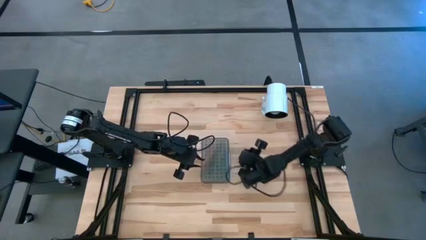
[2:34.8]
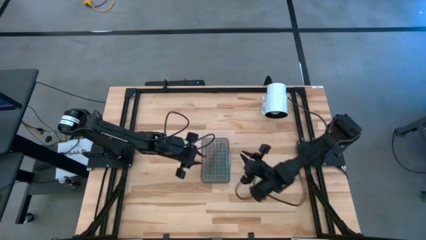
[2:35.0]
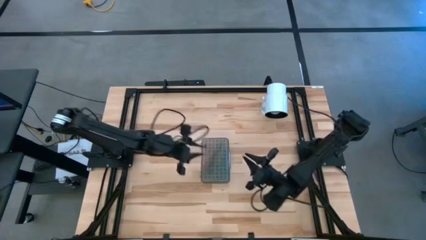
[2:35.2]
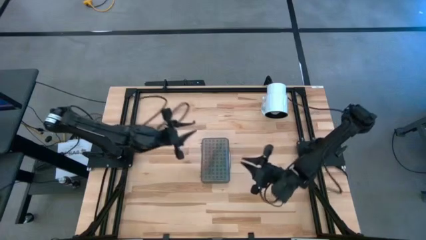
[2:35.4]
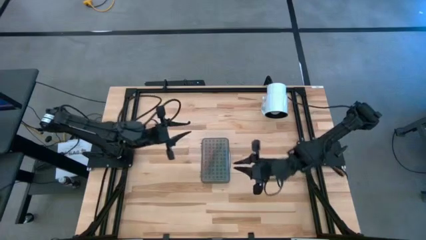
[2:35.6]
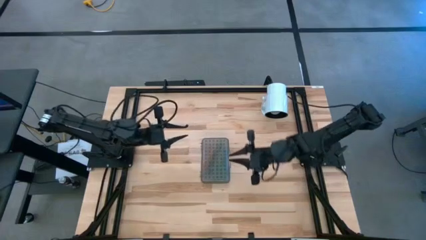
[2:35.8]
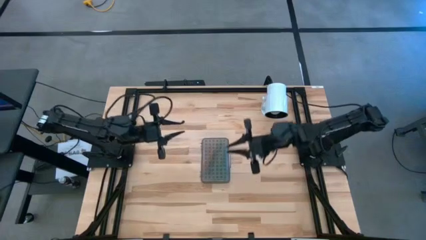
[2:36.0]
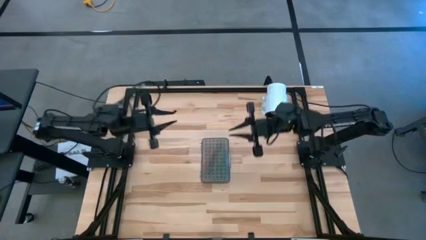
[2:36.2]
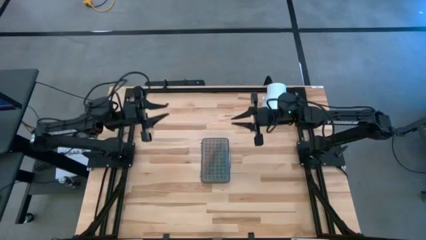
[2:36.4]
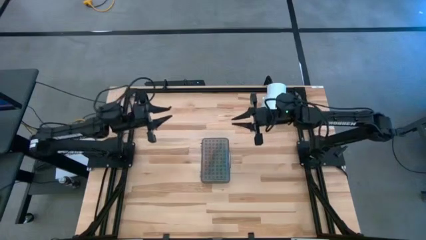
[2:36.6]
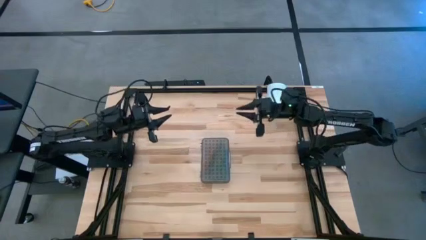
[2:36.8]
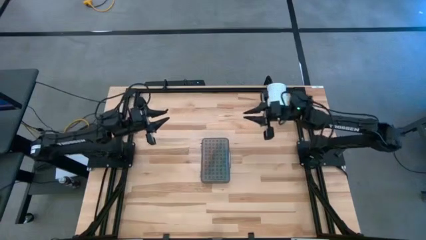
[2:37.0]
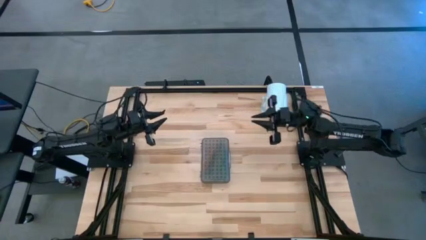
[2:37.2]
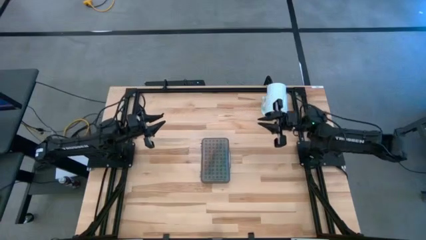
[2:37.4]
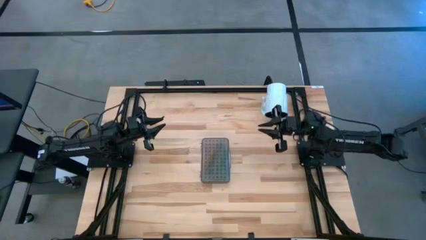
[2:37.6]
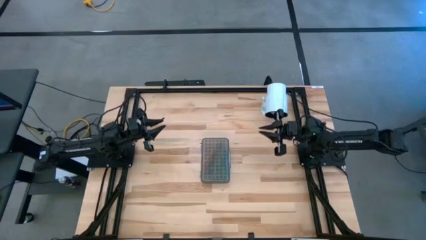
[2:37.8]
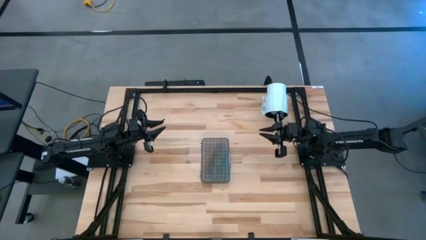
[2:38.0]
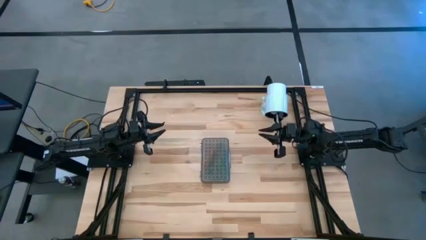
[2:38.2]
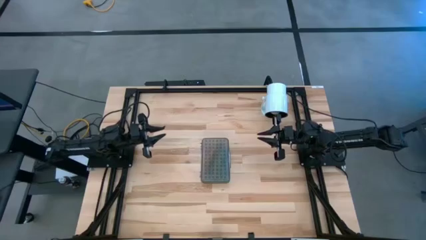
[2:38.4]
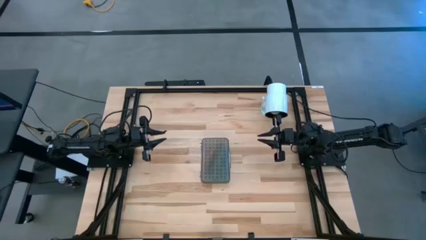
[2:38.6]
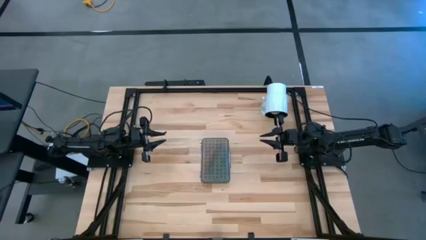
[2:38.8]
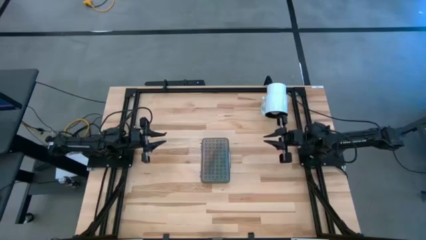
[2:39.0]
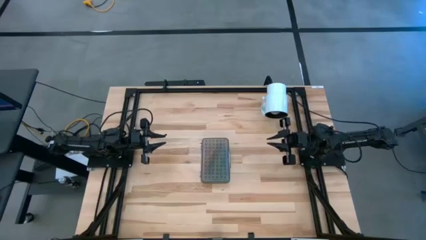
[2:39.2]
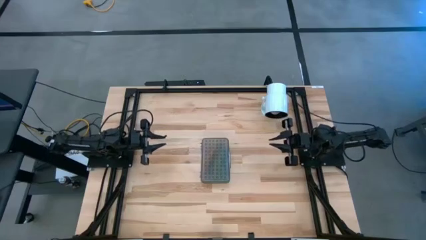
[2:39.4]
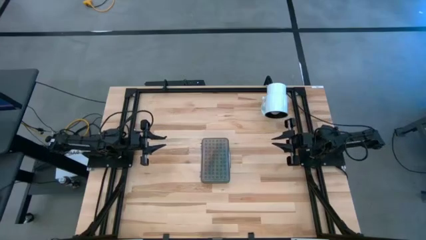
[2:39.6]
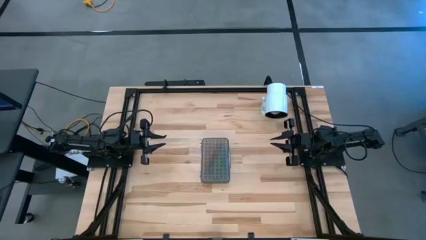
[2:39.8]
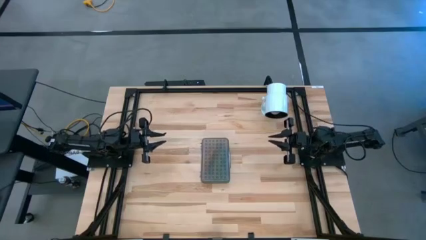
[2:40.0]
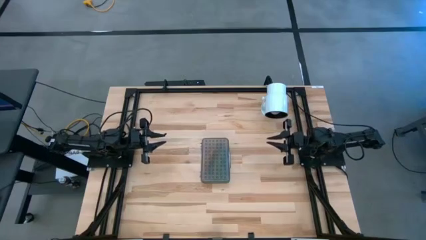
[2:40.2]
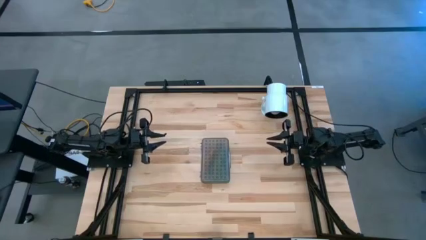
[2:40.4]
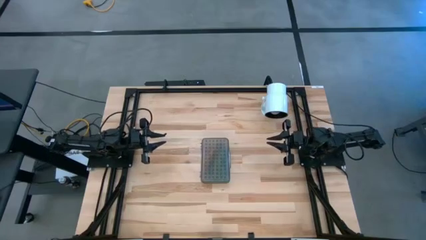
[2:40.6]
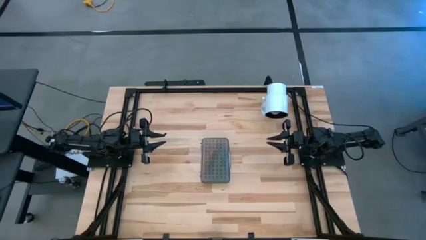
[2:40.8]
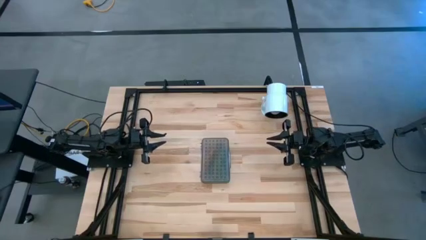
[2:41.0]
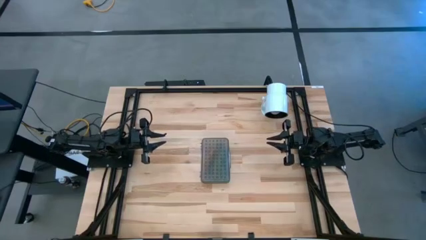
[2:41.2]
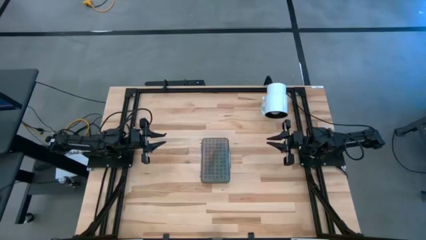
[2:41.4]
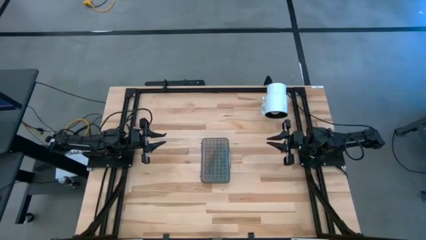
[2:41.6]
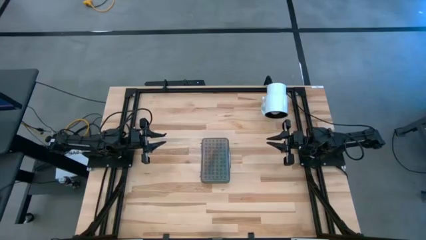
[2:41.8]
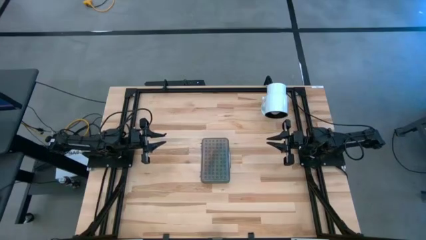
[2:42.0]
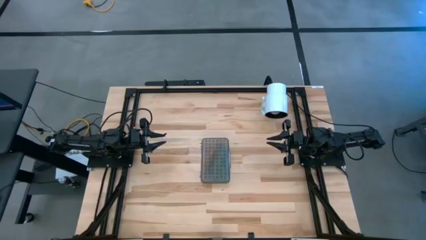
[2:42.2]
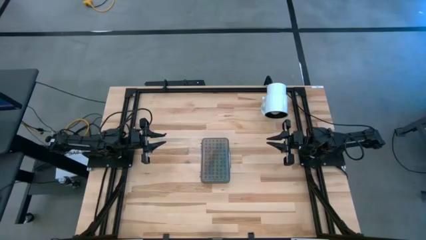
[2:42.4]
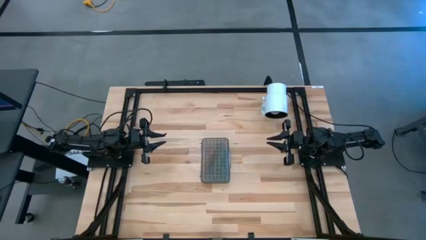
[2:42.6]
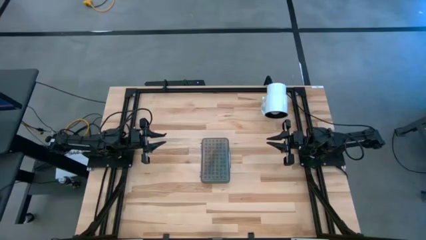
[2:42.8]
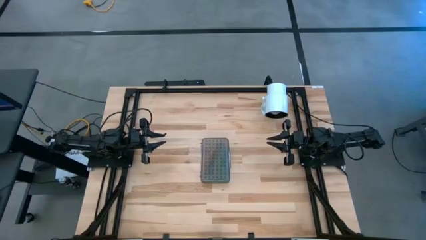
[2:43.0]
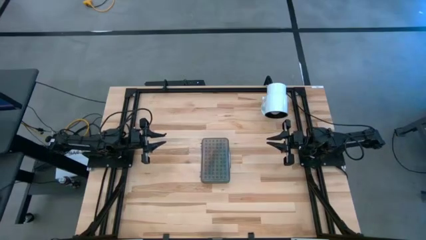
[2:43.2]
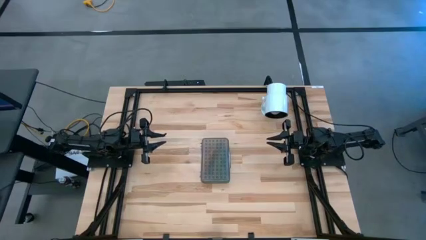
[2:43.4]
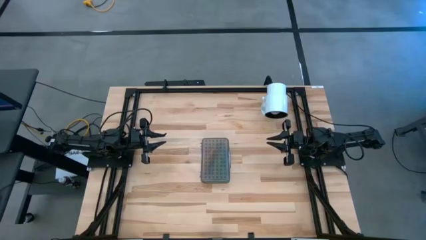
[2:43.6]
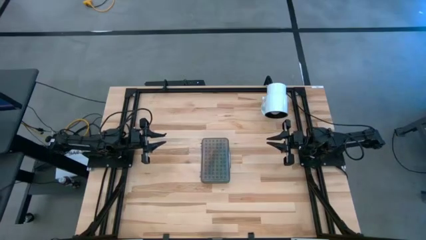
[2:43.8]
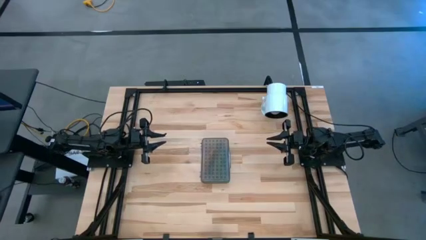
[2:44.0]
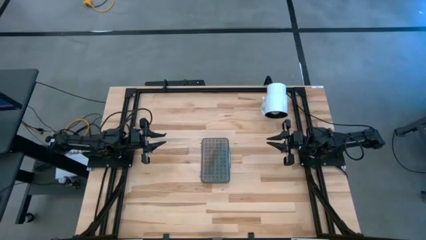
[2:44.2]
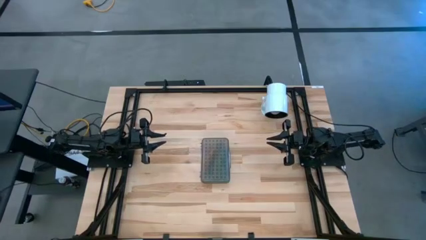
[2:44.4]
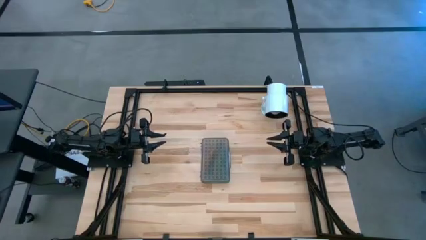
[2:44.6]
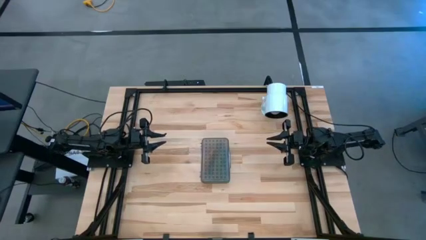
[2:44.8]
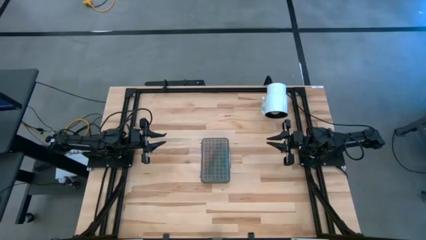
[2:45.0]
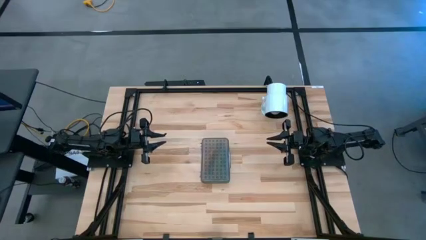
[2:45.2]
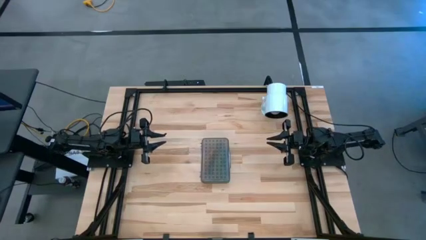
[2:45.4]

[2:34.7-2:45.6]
Task: Pick & place school supplies into a supply box
Return to home position

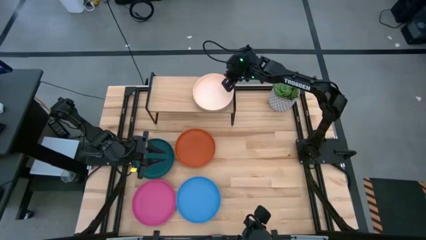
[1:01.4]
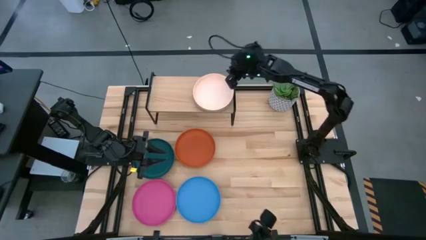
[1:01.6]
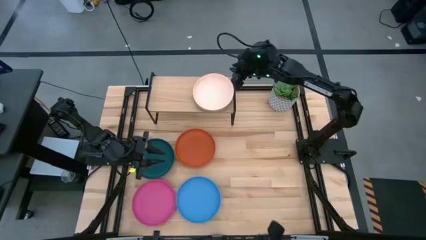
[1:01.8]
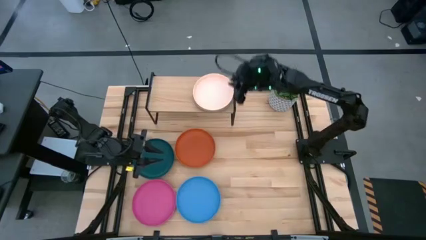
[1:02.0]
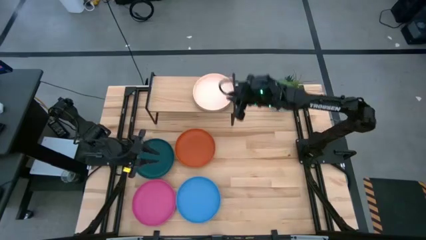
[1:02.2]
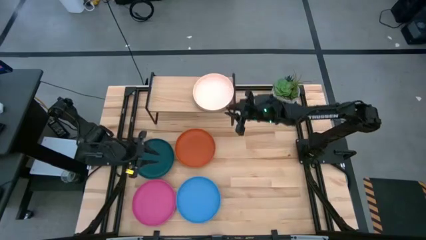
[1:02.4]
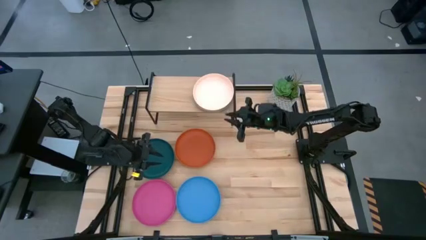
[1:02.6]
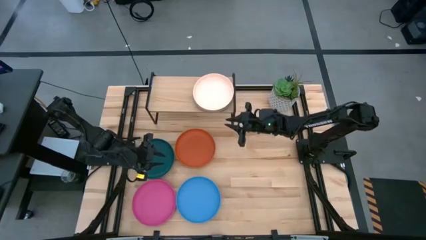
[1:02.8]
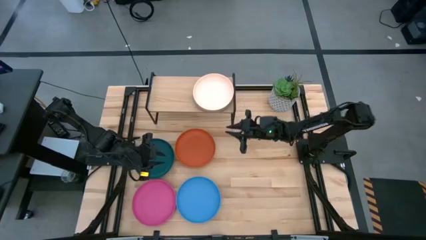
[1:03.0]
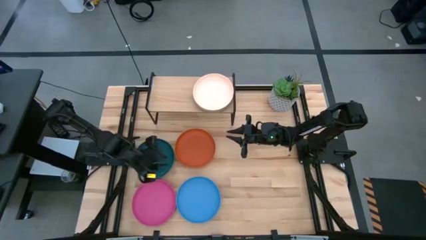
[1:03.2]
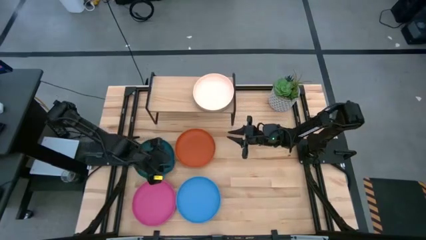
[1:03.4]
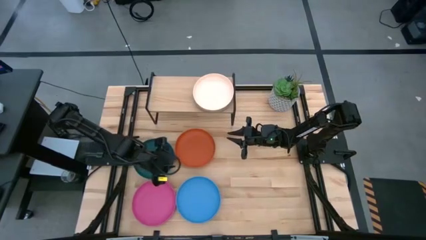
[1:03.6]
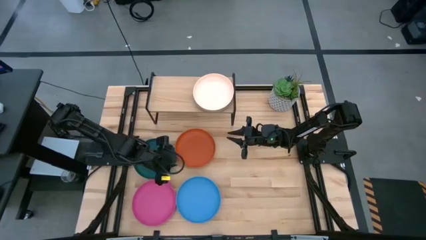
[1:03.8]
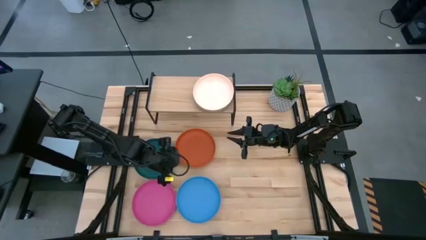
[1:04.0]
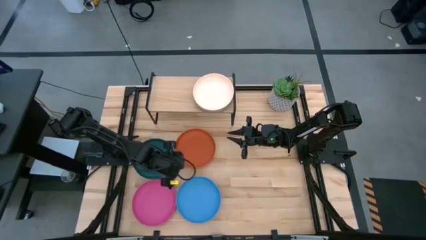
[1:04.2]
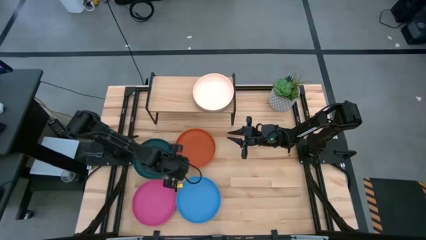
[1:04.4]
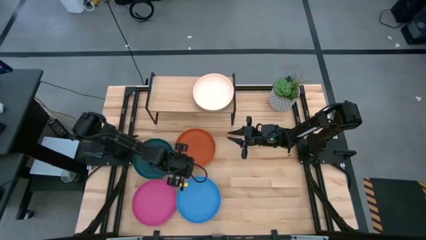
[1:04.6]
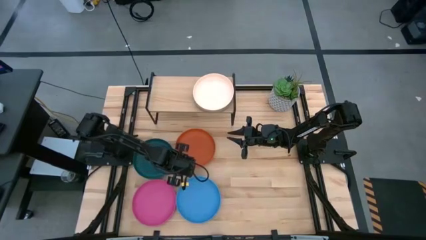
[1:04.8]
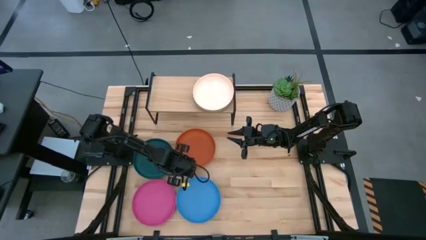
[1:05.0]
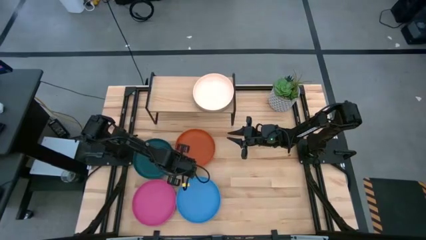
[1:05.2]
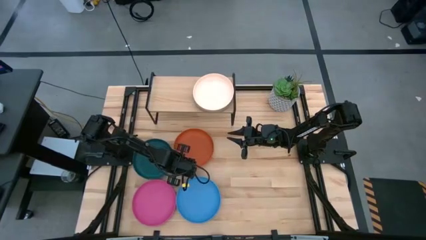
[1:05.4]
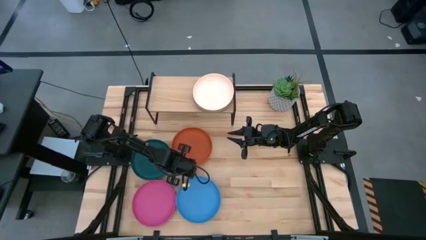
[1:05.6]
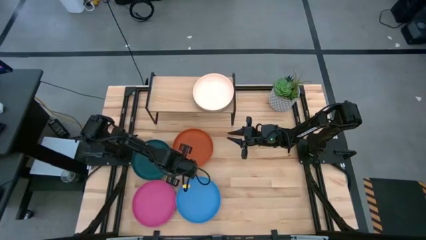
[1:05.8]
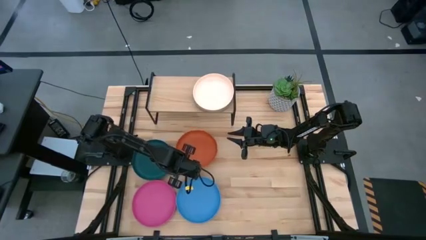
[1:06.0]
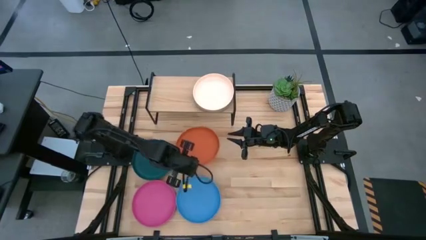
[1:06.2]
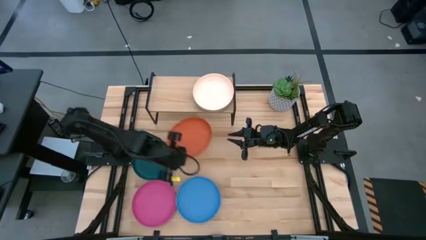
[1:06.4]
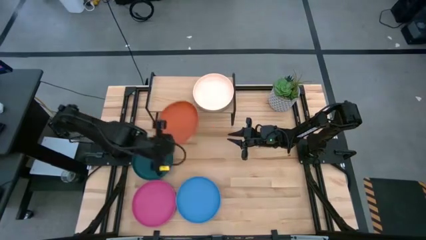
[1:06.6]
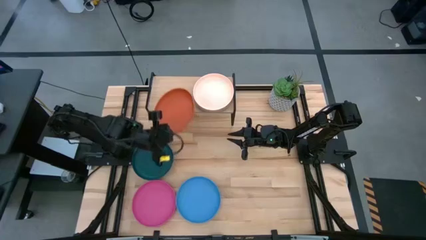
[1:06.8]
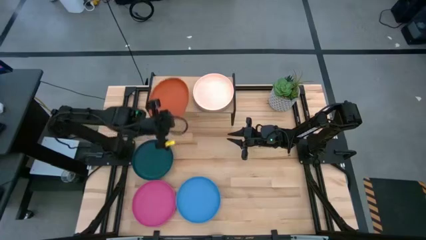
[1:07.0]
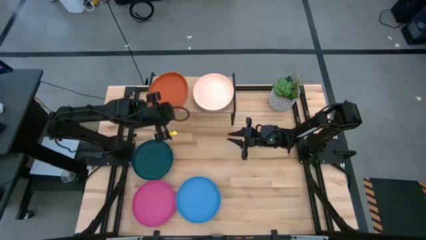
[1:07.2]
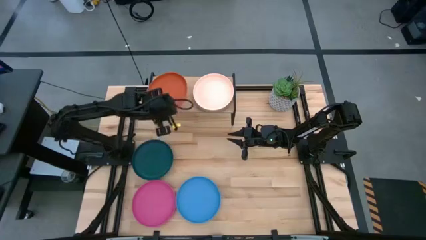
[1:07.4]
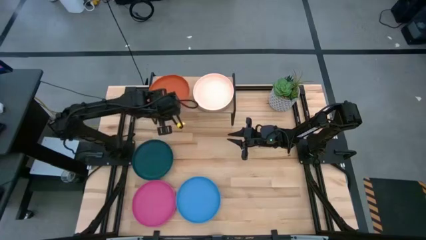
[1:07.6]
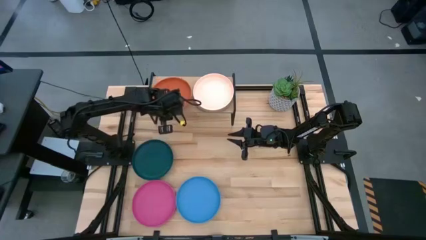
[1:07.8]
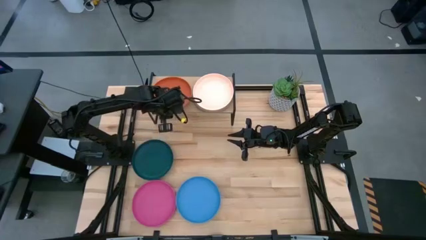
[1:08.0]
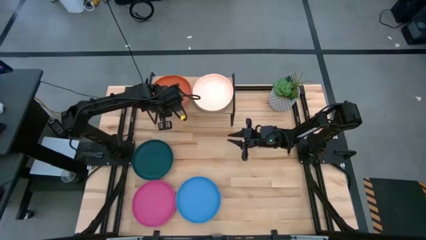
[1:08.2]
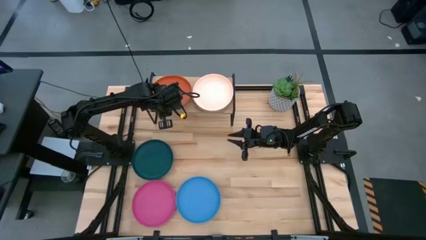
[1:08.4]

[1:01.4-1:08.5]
Task: Place and stack plates onto a shelf
Put the orange plate on the shelf
